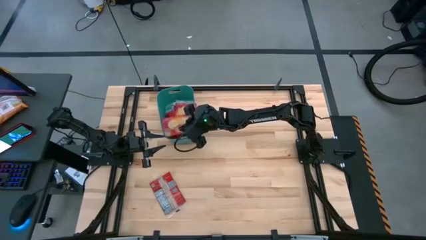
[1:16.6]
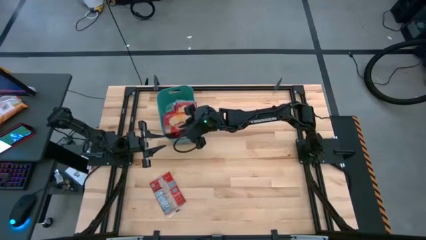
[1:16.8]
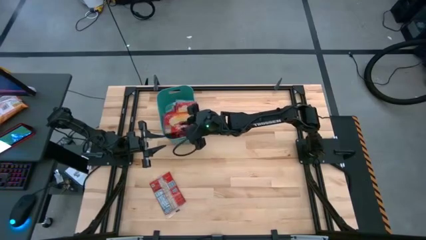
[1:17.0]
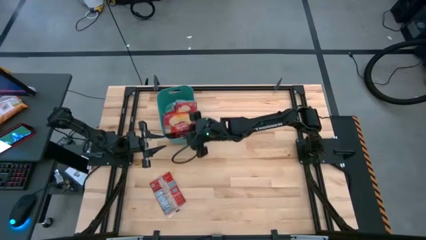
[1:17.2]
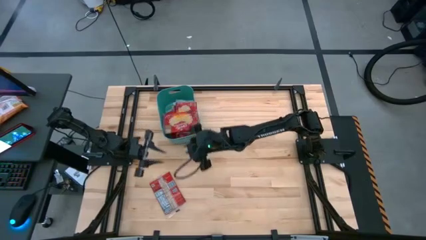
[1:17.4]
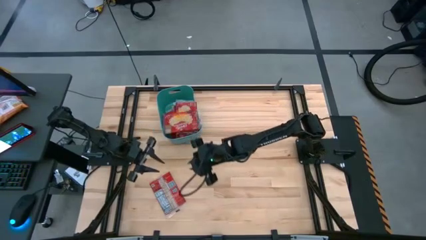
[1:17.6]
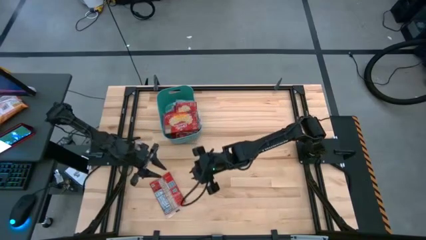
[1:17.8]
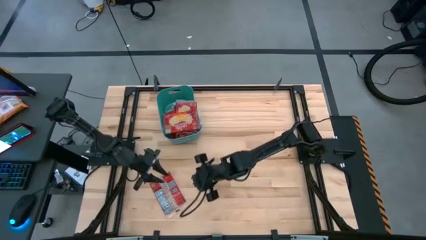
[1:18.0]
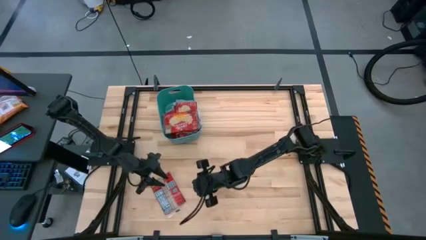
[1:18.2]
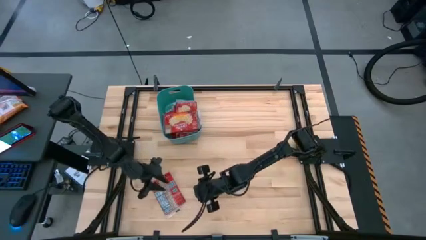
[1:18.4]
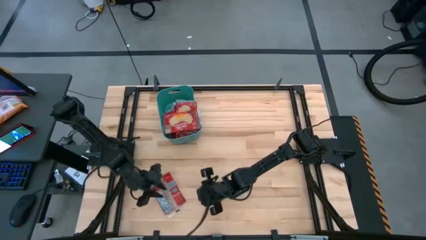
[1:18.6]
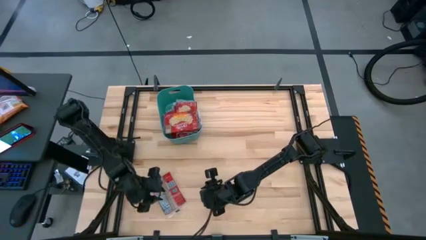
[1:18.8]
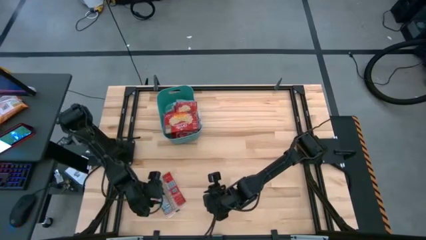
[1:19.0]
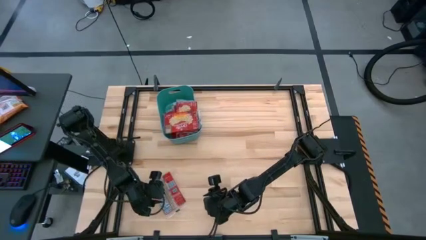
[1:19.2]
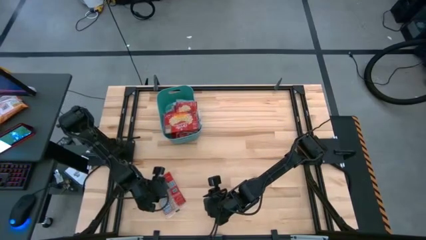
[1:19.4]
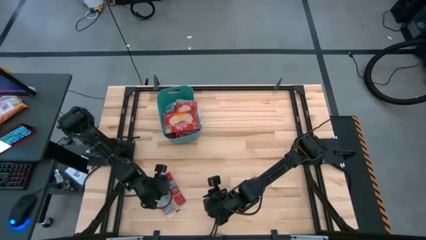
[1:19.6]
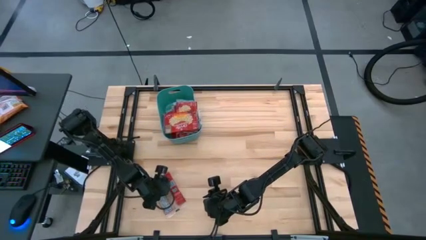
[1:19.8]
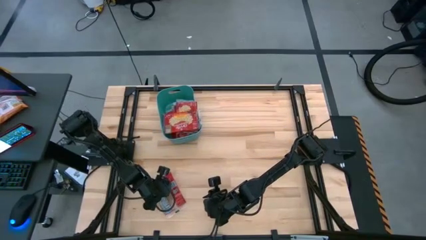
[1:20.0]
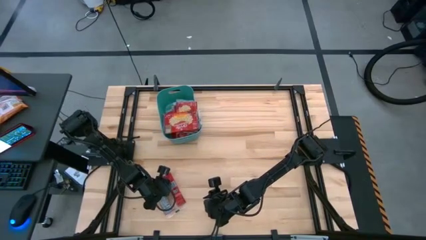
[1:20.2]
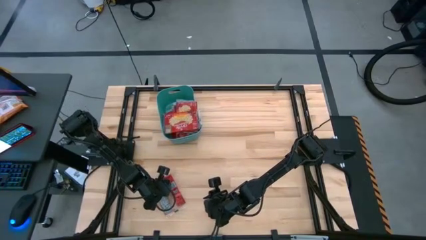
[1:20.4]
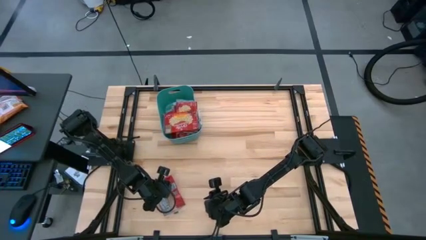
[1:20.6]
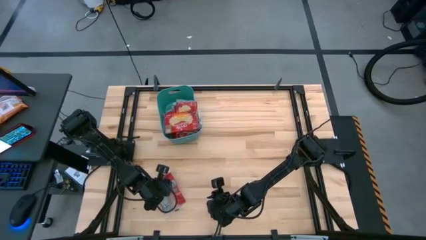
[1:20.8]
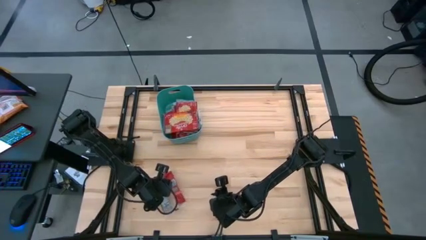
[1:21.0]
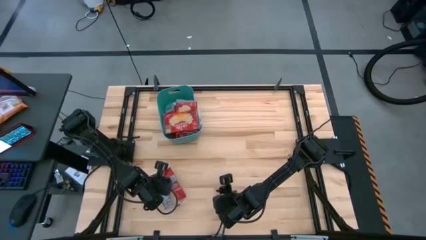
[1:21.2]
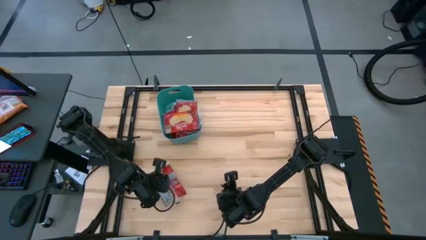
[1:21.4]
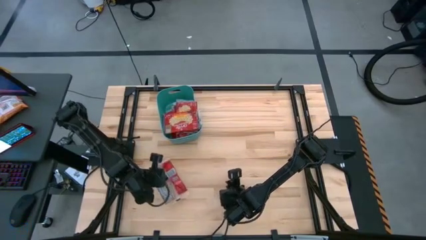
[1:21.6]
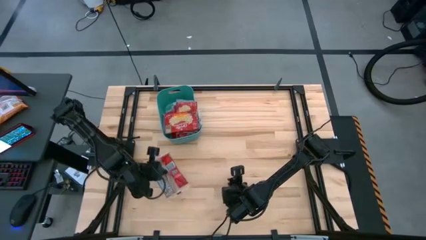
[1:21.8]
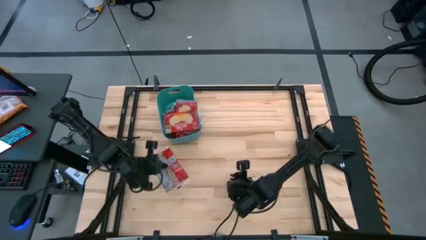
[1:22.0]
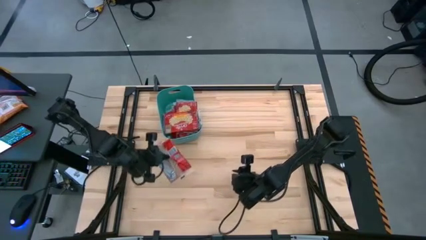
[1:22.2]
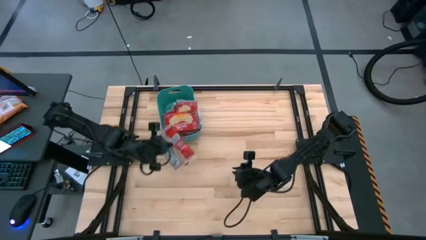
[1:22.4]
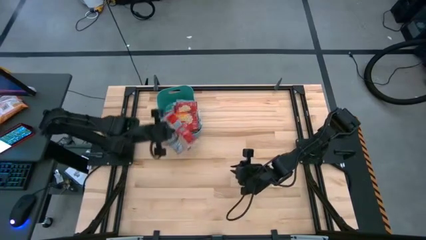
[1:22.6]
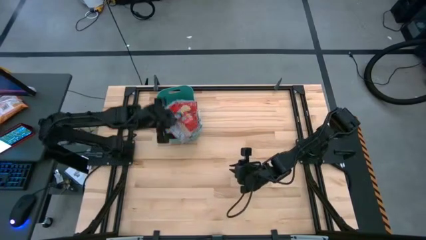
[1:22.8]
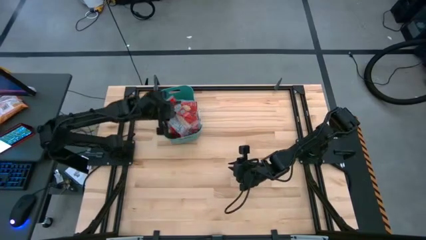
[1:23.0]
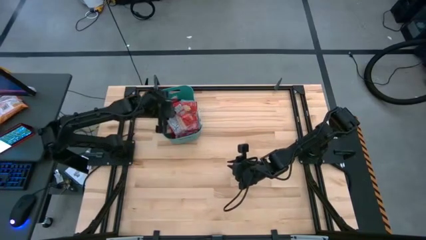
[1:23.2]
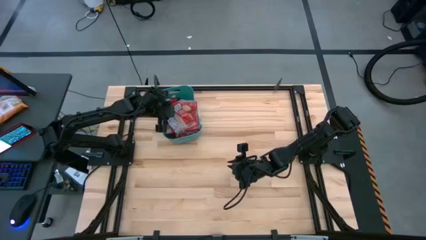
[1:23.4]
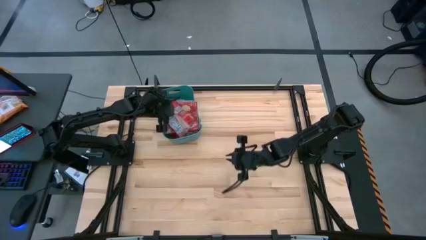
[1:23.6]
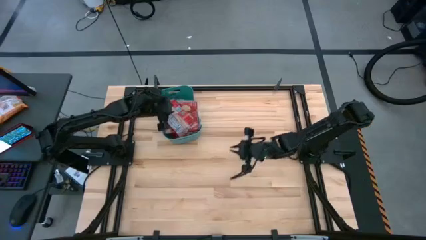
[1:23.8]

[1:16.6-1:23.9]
Task: Sort popcorn bags into baskets
Put the red popcorn bag into the green bin

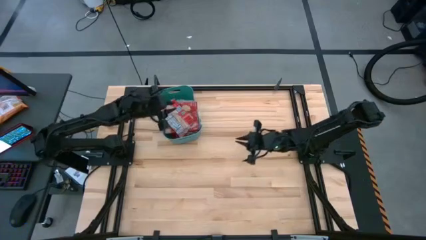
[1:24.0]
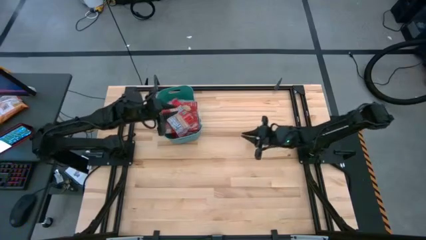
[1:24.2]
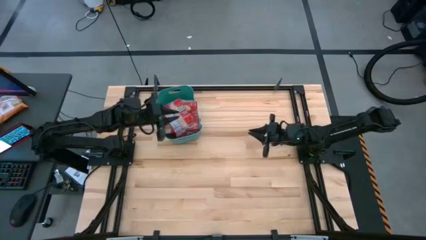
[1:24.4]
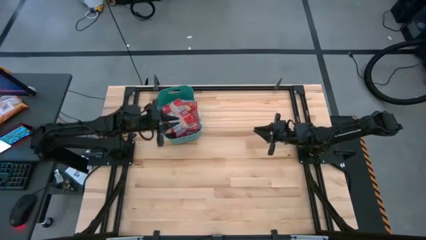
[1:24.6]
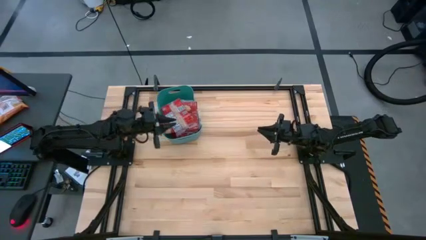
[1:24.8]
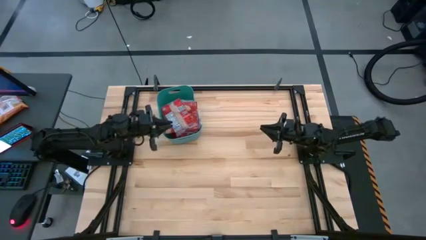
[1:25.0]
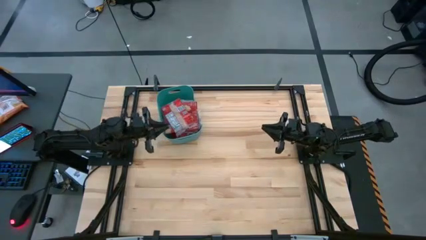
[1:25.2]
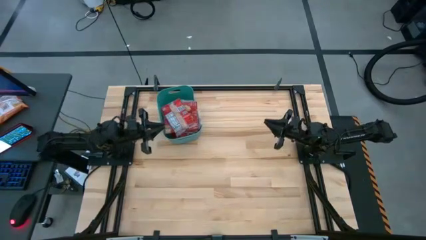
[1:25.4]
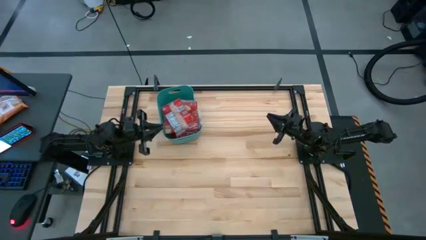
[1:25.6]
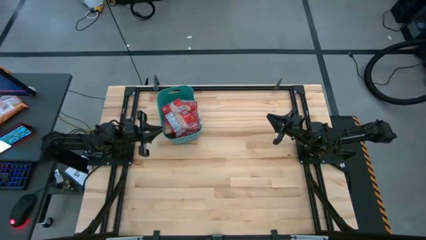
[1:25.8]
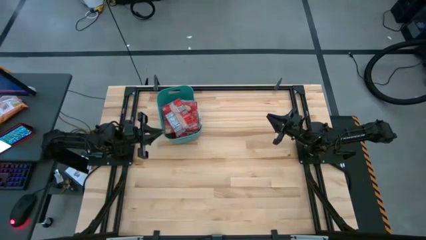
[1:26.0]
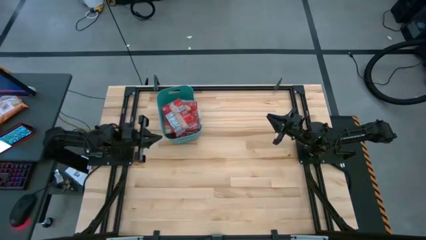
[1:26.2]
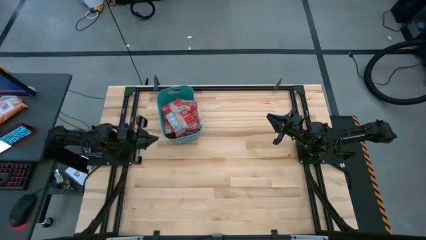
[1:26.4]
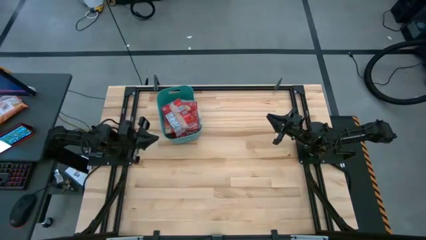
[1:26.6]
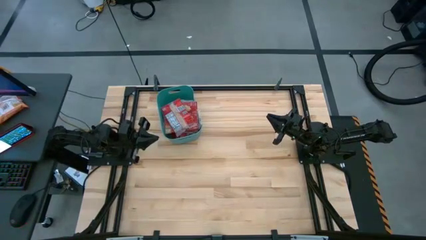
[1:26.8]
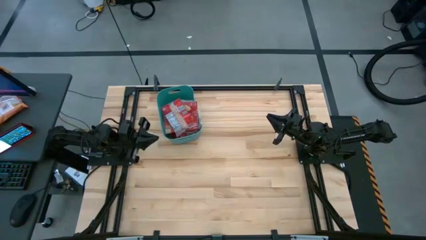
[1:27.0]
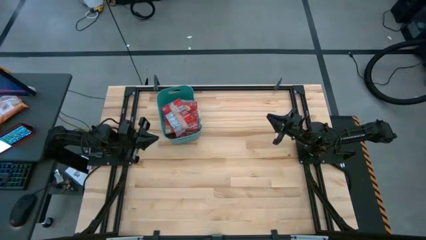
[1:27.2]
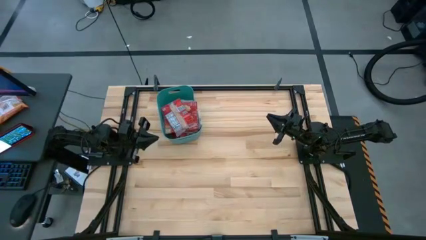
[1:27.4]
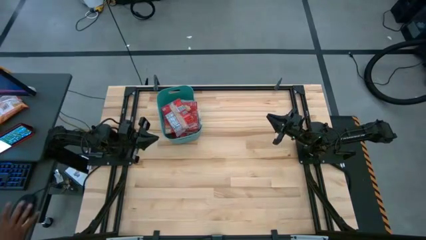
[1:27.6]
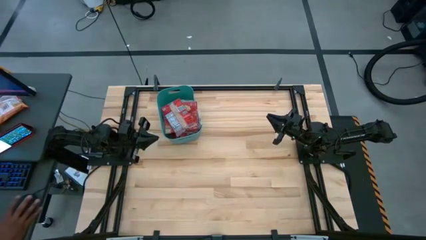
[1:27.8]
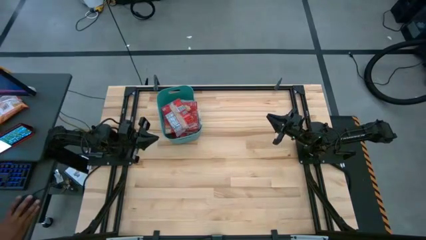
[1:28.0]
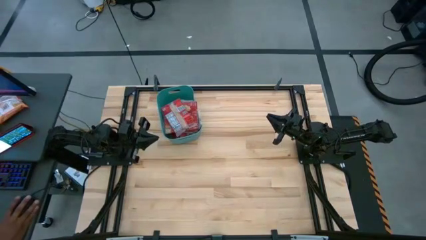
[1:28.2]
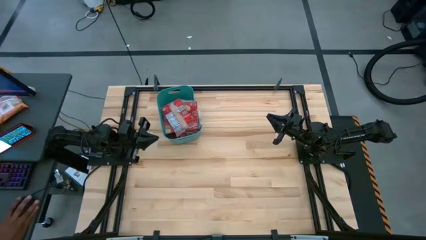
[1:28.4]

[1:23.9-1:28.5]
Return to Home Position
